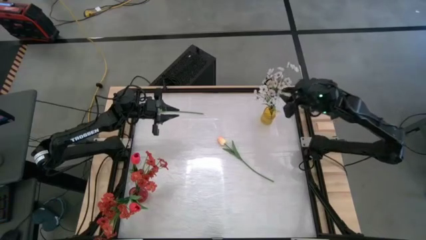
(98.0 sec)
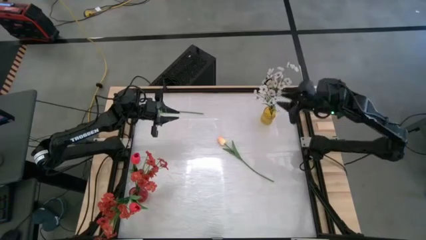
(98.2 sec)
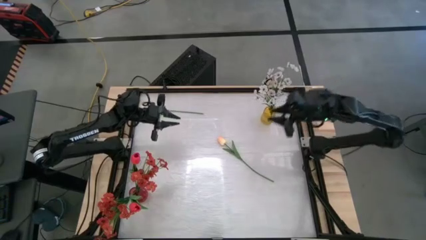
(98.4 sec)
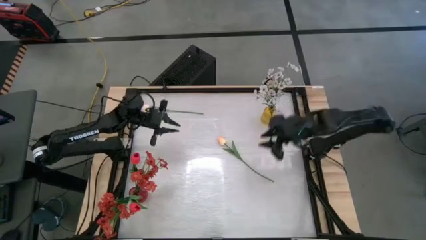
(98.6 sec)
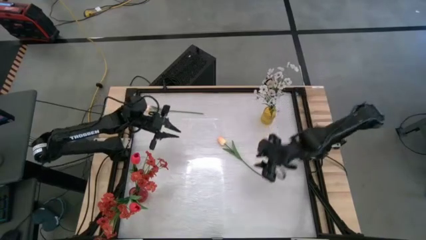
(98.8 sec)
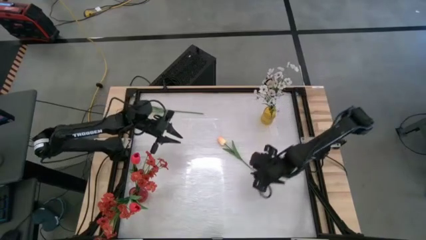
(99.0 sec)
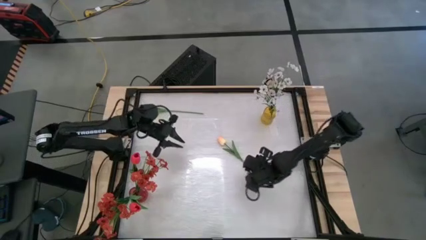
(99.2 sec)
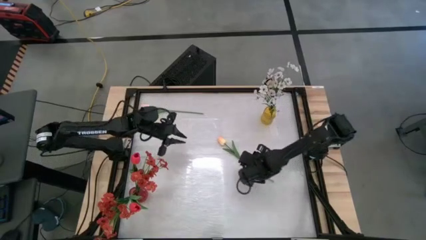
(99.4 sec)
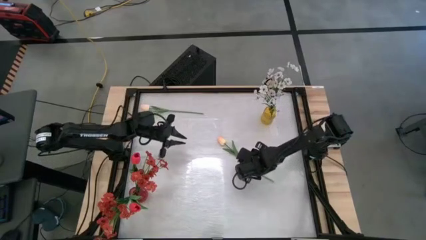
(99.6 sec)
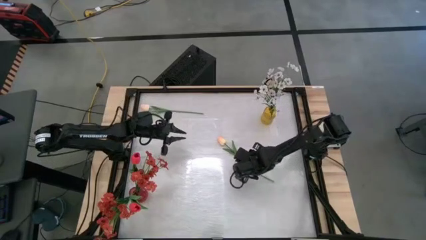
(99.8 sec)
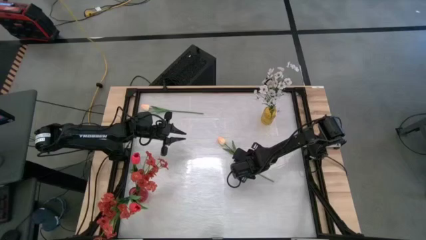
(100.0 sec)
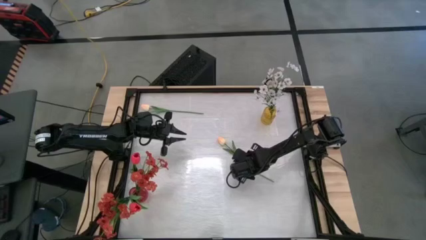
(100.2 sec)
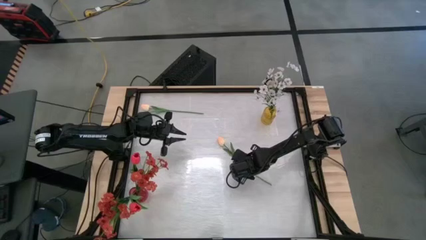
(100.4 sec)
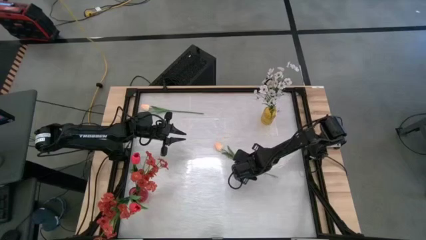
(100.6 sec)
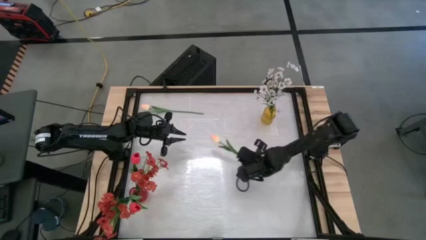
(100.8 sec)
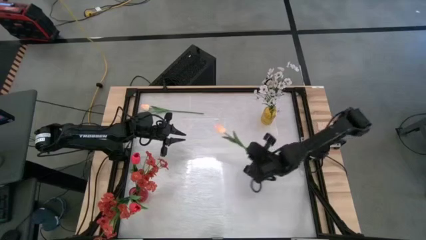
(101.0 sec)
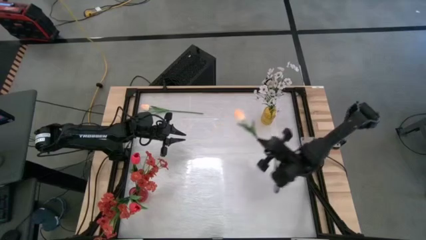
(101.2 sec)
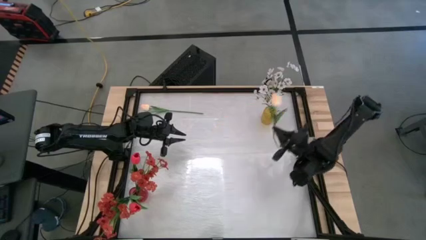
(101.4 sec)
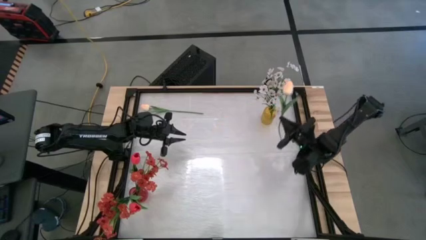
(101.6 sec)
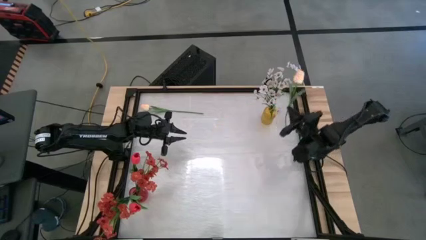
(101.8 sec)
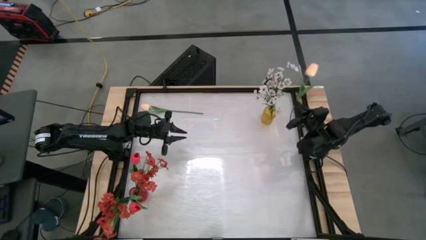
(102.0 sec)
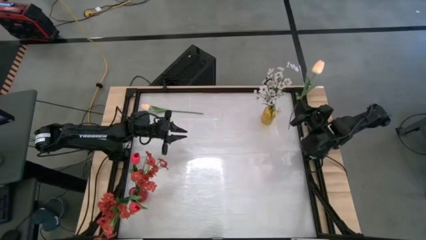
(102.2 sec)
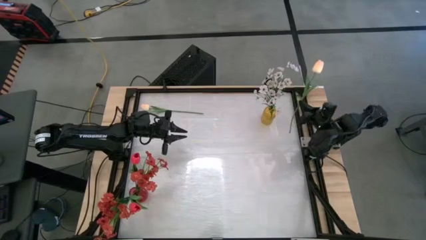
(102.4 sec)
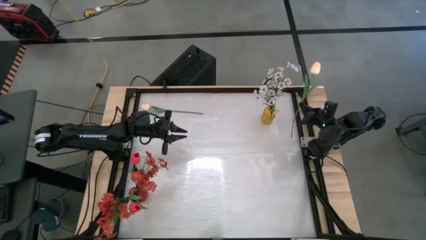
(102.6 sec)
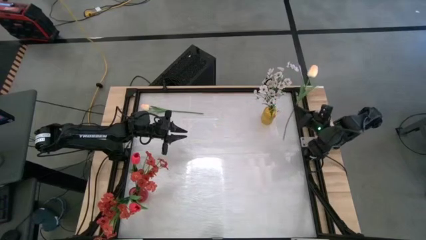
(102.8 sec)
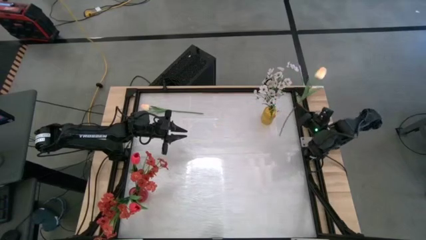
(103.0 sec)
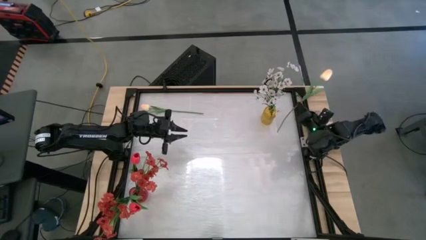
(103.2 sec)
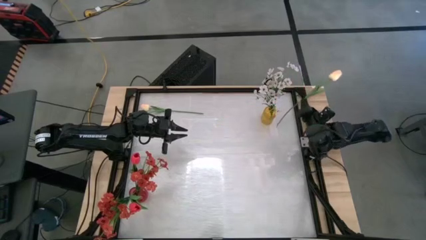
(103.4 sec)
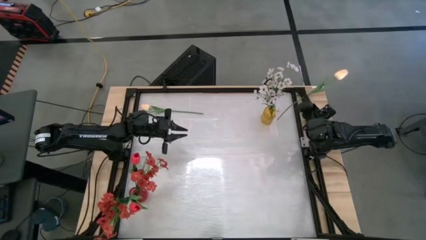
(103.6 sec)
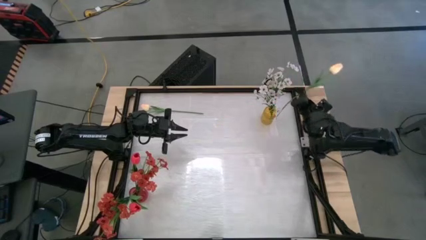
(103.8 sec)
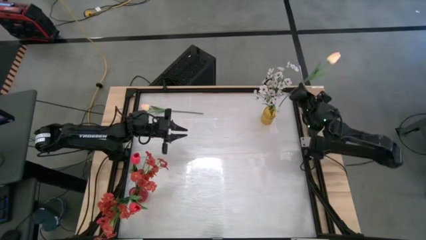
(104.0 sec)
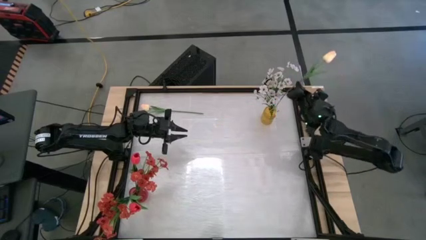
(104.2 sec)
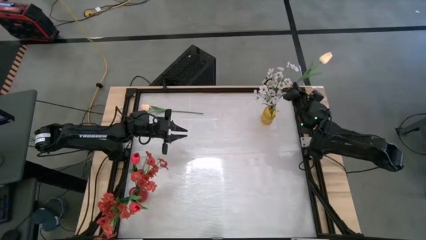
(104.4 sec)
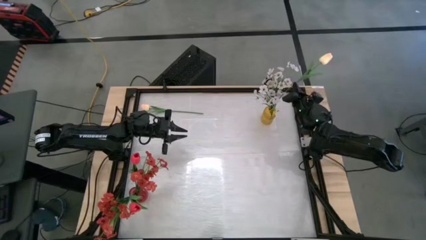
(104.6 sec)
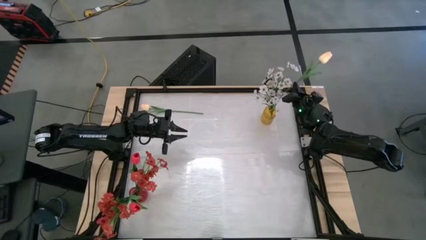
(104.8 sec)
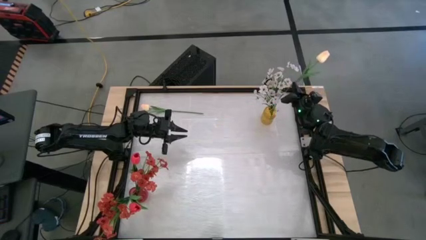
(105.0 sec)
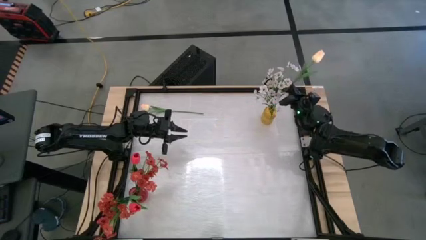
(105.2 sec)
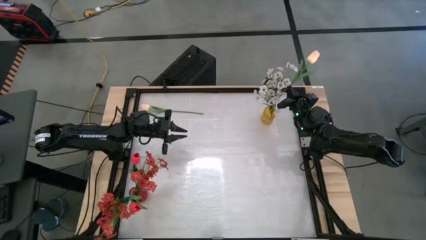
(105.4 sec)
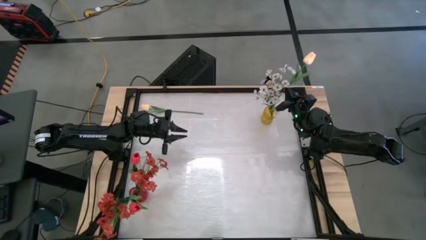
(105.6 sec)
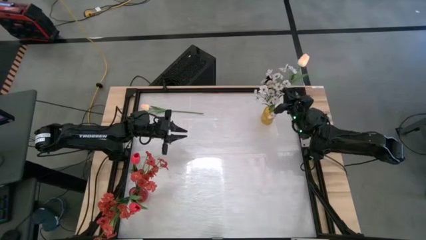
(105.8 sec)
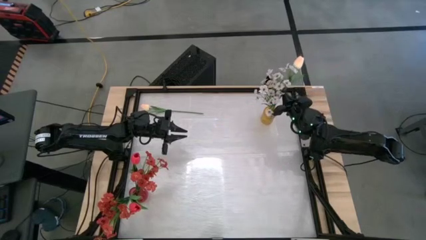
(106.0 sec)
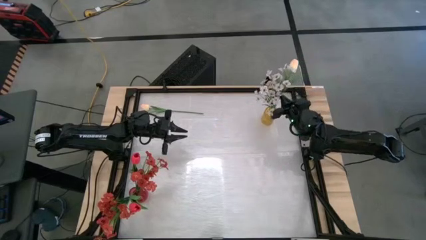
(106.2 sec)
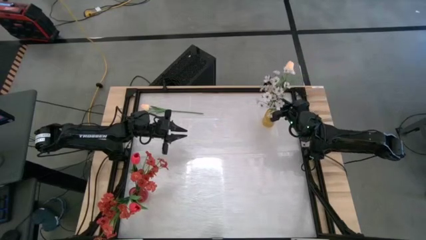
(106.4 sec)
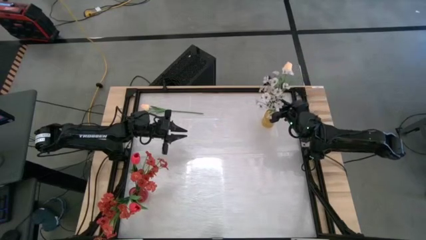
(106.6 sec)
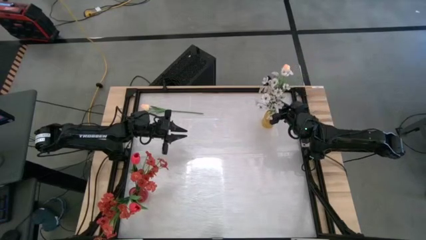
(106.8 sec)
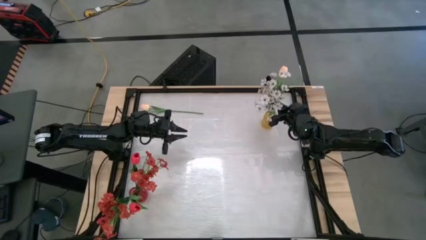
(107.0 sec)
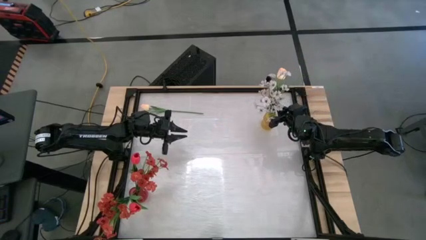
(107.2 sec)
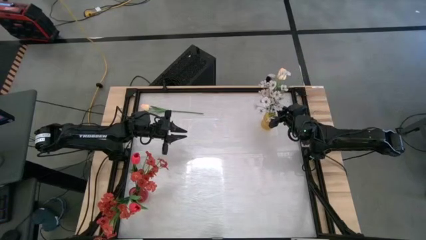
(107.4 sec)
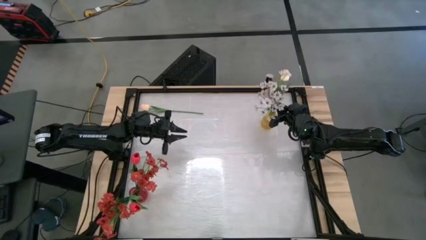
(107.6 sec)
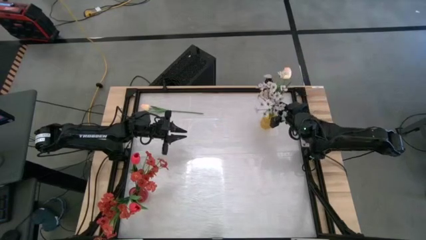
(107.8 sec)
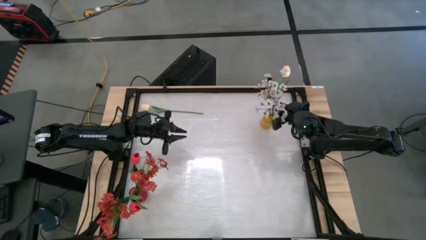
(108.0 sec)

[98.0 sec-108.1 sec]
Task: Sort flowers into vase by color
Put the bottom of the white tulip into the yellow vase
